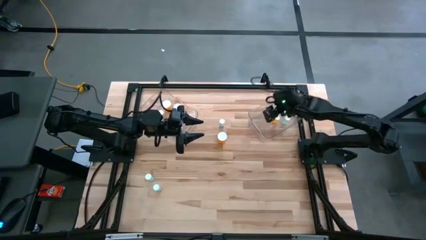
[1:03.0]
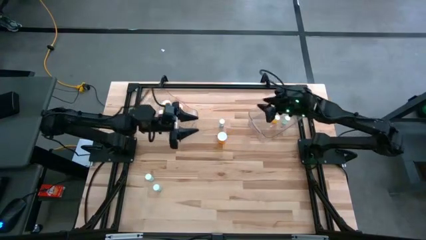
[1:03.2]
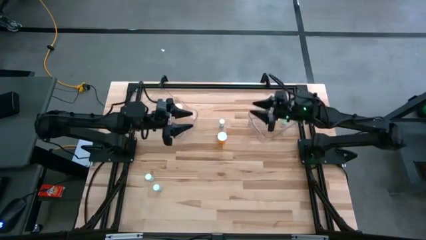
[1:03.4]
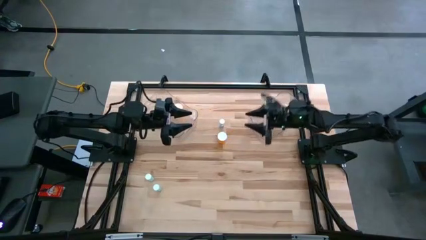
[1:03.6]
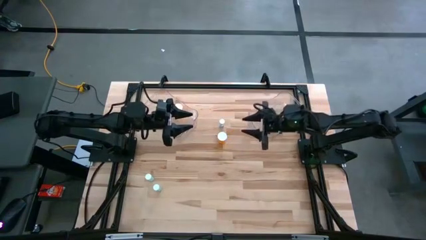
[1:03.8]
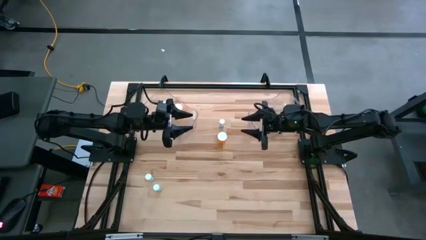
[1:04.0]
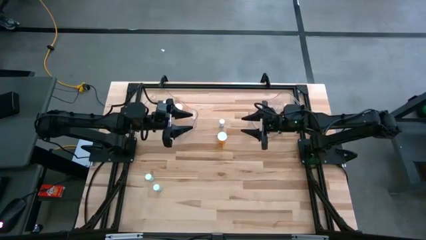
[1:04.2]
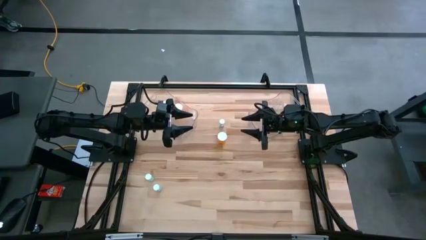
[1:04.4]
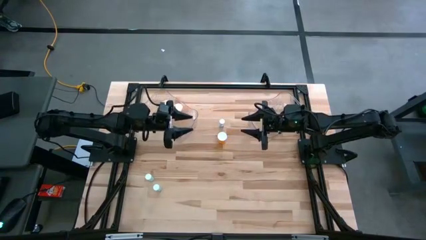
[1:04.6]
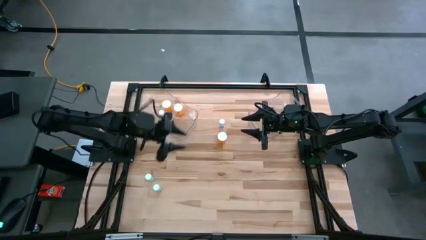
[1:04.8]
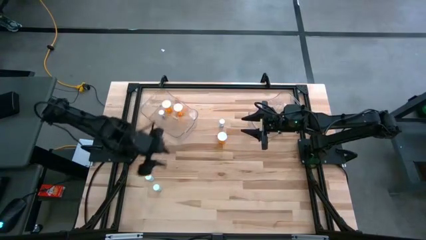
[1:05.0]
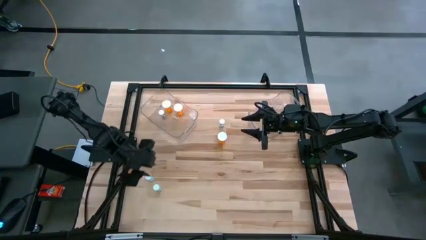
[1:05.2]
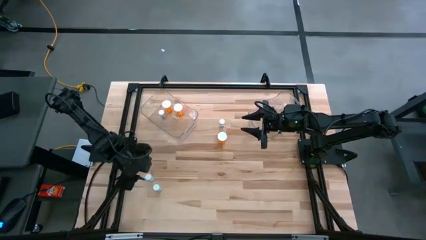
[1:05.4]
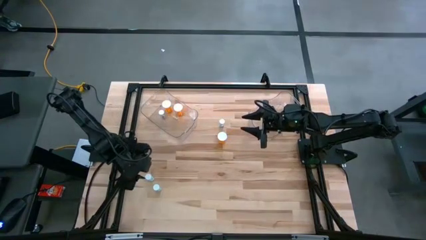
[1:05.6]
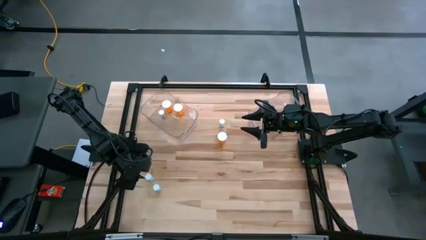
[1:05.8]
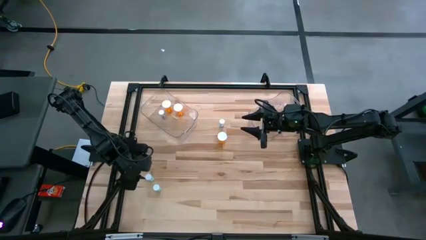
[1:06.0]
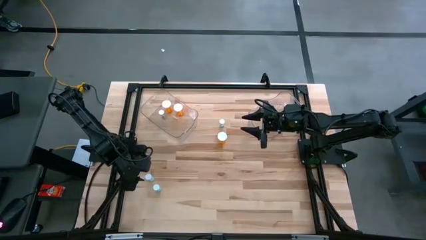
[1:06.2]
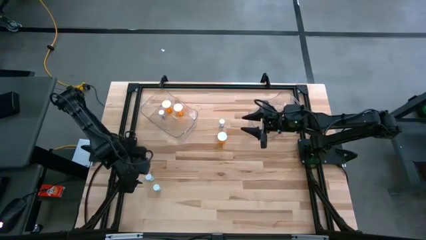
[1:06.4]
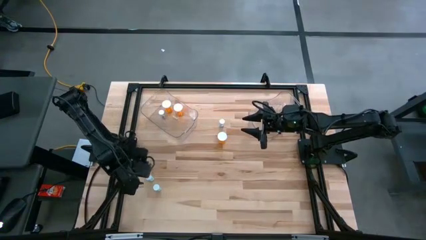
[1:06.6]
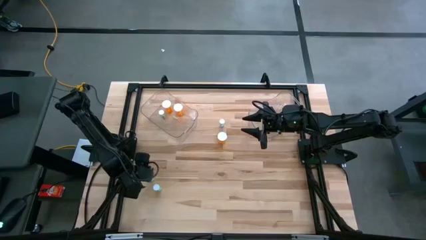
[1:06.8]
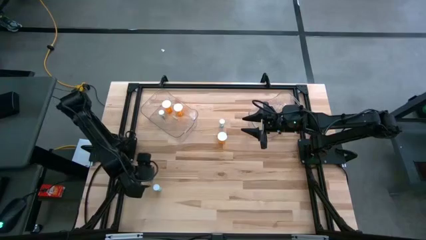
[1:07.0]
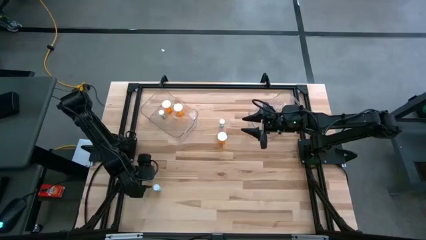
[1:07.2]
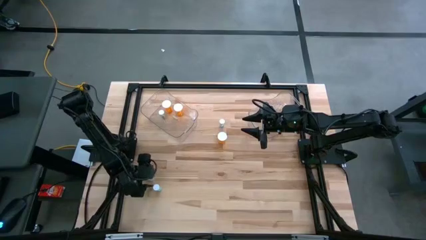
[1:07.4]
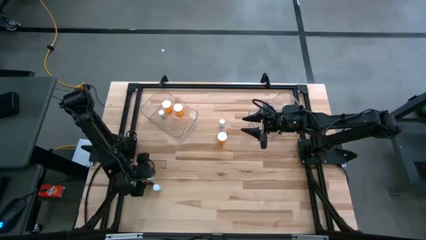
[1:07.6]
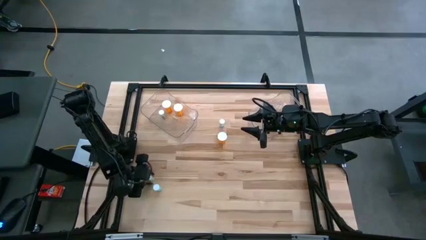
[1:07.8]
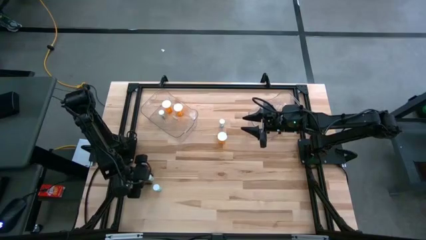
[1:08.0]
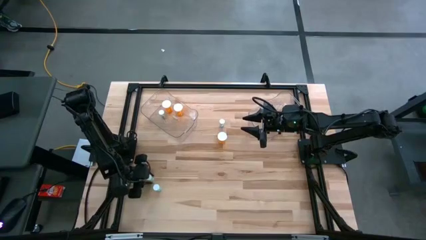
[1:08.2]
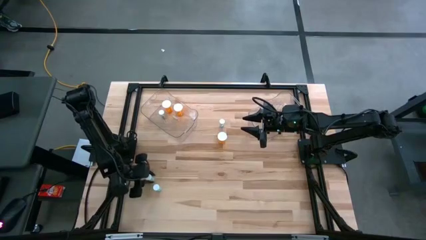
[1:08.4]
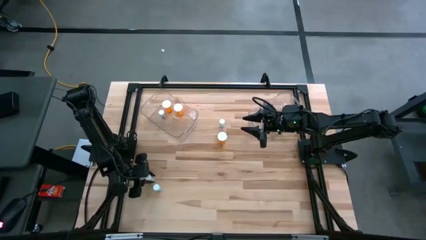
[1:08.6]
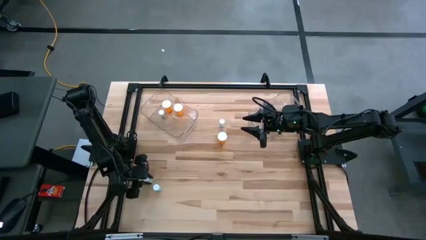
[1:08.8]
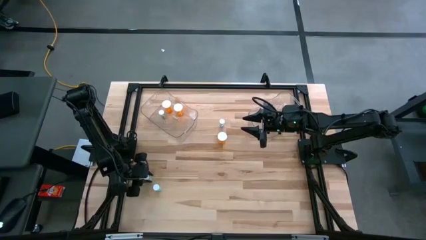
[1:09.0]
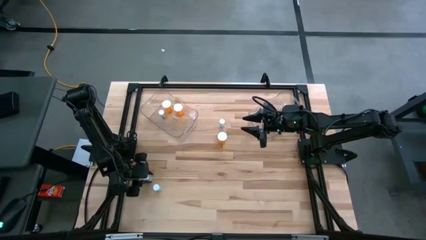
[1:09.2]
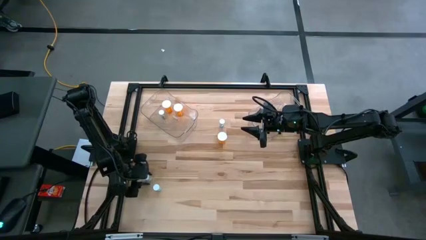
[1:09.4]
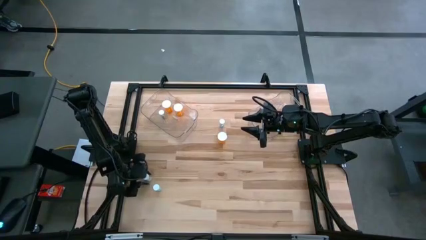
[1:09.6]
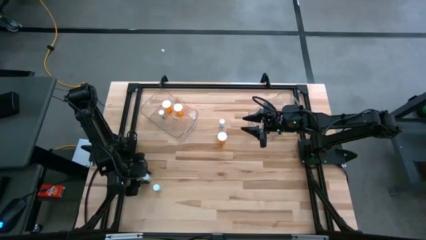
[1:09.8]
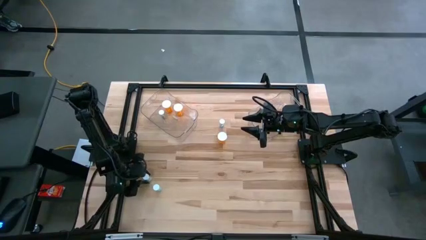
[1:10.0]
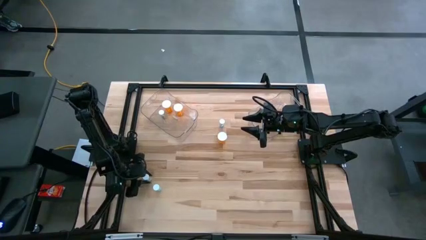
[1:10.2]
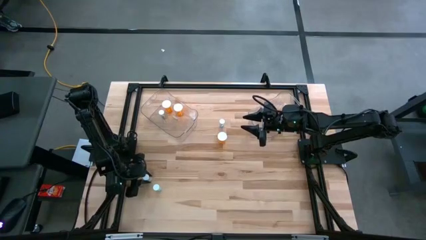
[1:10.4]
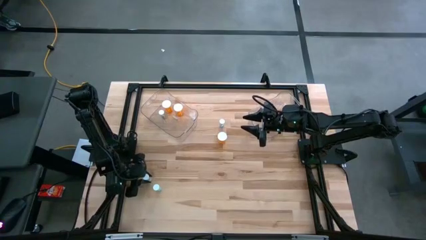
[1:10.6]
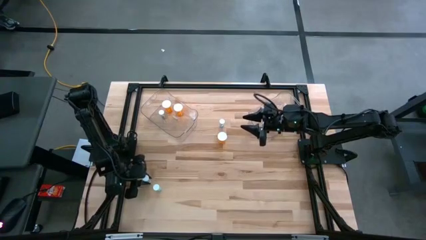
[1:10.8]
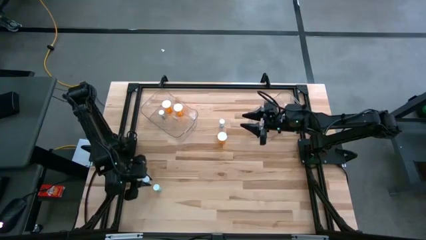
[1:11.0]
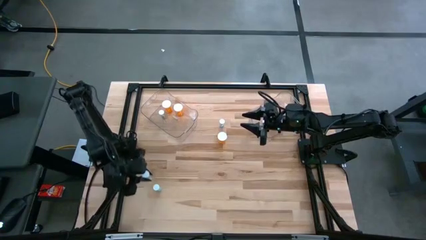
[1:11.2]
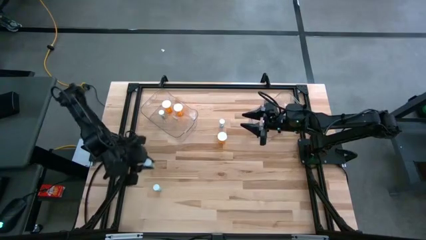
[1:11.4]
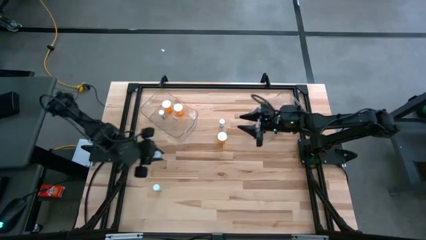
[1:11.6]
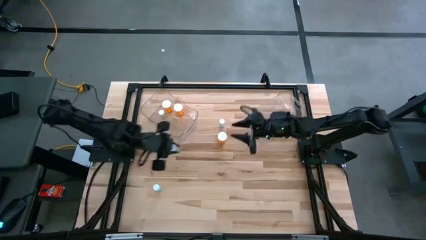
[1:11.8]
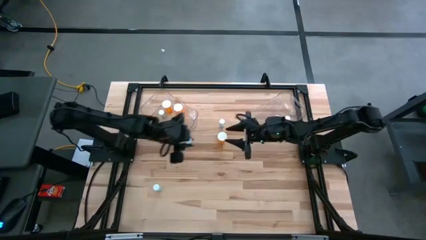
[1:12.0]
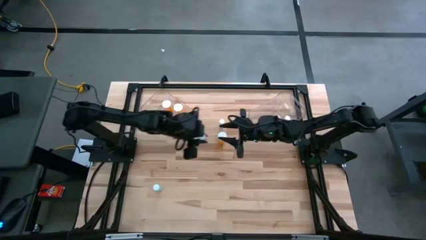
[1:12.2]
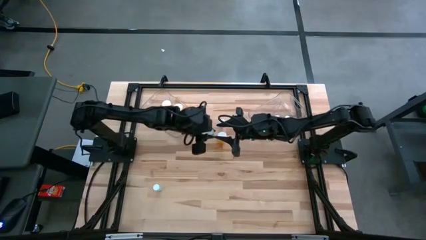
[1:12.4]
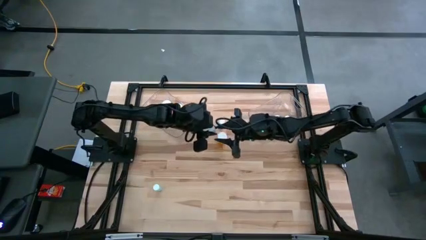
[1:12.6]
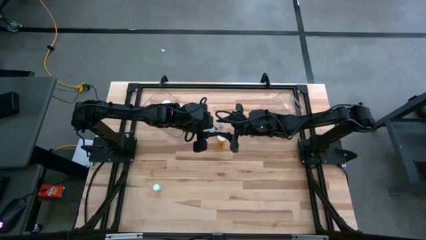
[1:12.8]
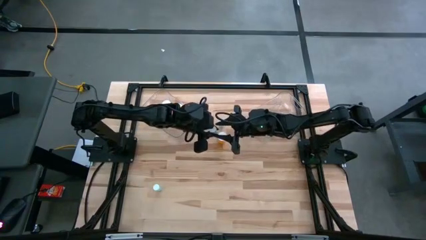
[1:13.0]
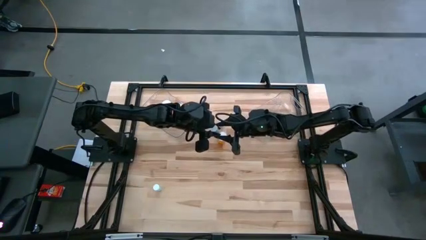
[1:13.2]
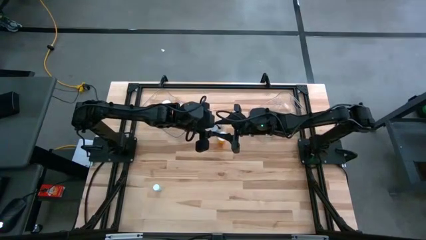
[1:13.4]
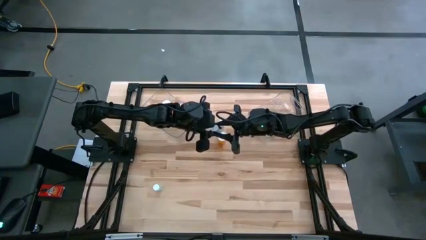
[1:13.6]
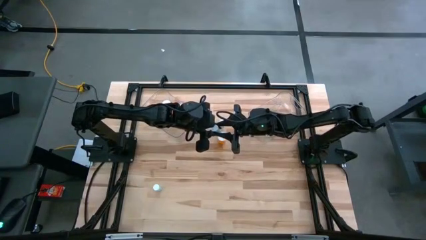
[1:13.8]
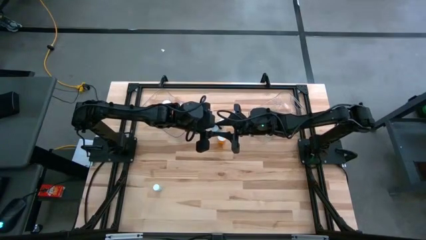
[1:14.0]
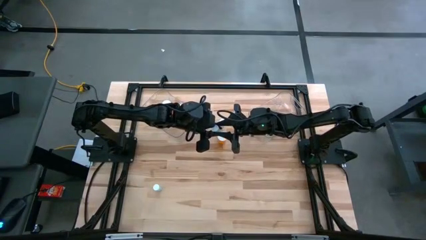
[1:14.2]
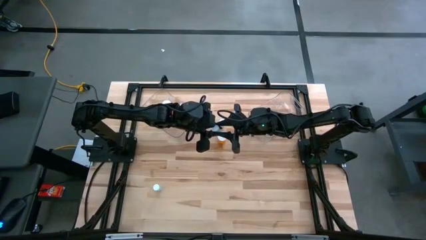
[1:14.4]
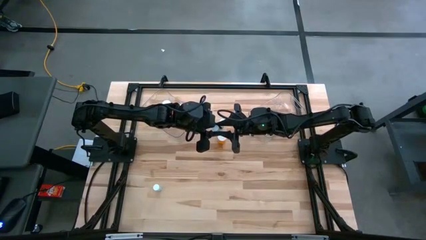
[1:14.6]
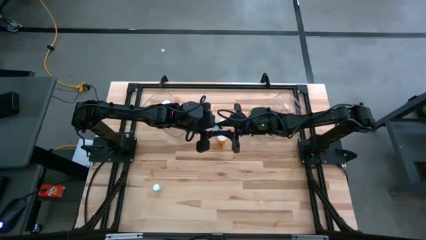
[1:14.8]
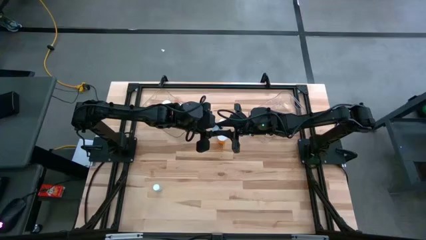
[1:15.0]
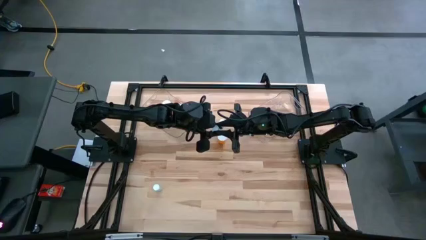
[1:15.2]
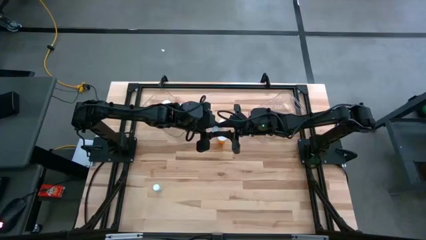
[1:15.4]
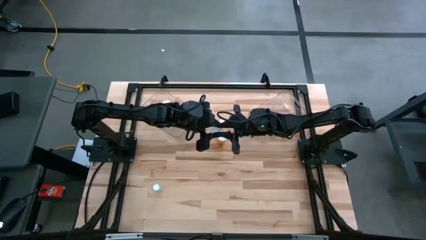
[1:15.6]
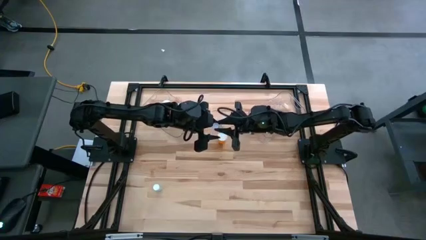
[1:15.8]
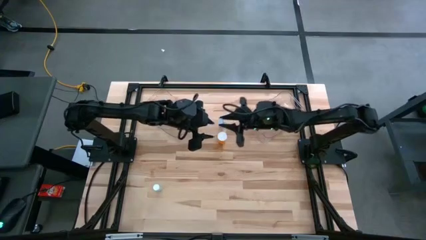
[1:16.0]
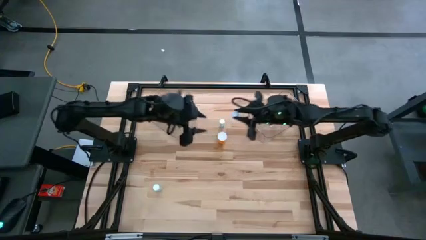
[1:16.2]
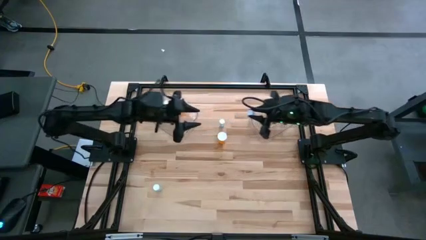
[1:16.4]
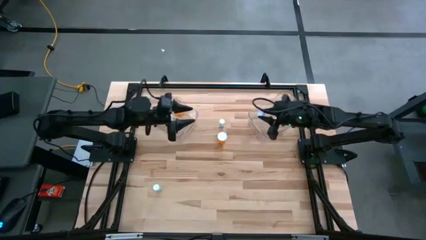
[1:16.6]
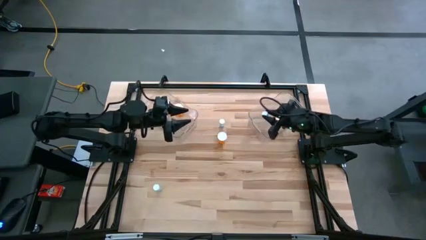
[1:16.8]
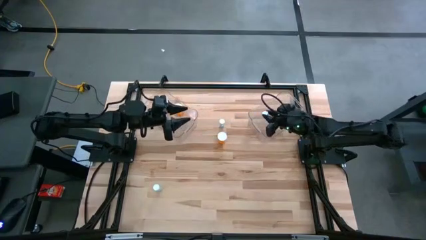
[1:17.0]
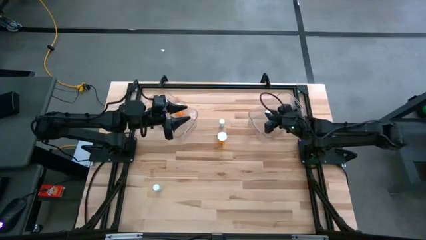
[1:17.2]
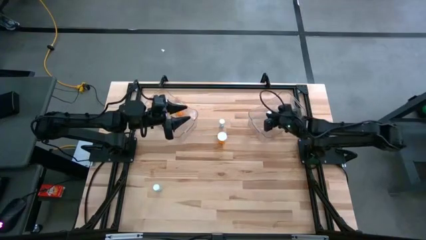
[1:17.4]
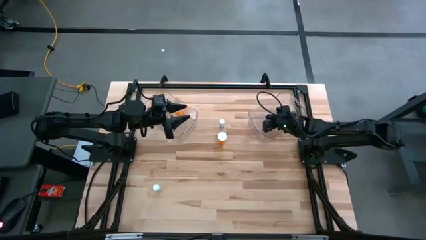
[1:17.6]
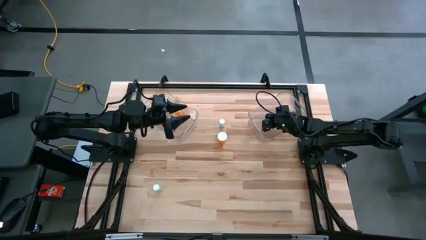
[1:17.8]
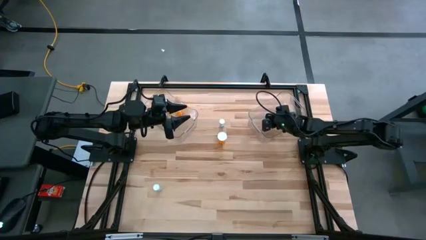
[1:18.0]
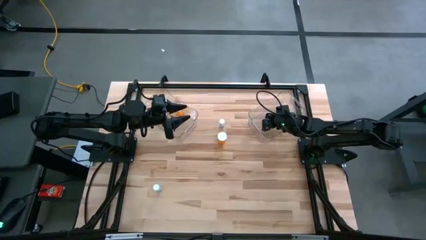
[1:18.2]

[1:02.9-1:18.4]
Task: Pick and place medicine bottles into bin by pill shape (circle, oval)
Put the top green tablet bottle into the right transparent bin

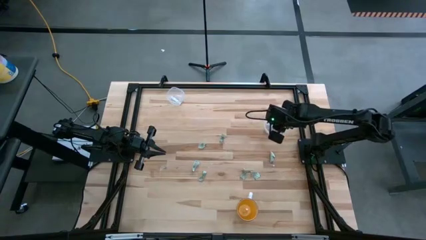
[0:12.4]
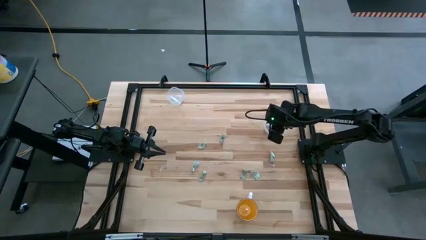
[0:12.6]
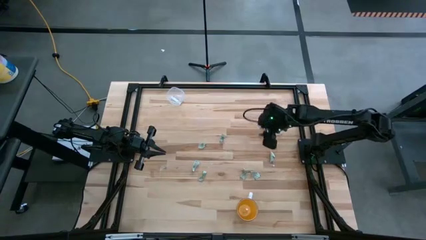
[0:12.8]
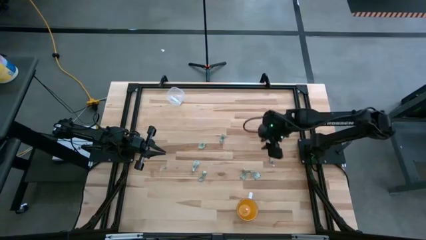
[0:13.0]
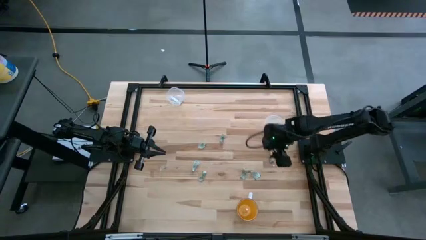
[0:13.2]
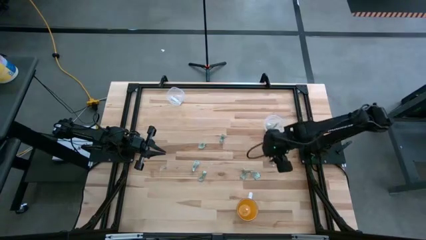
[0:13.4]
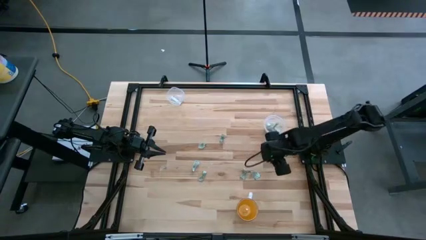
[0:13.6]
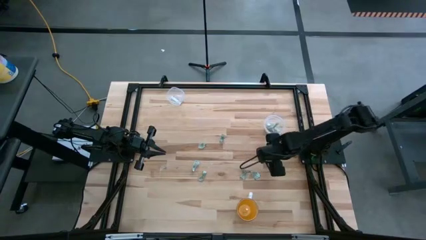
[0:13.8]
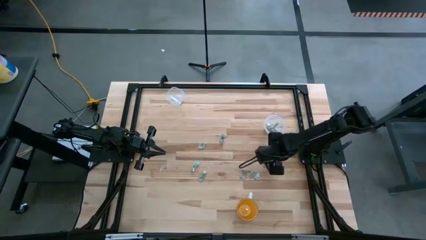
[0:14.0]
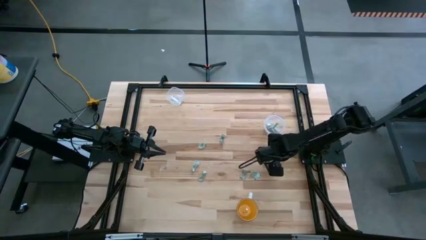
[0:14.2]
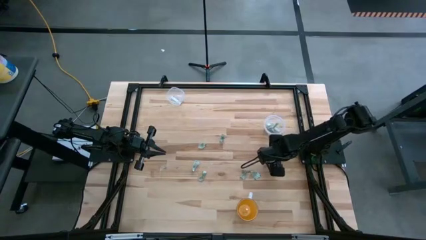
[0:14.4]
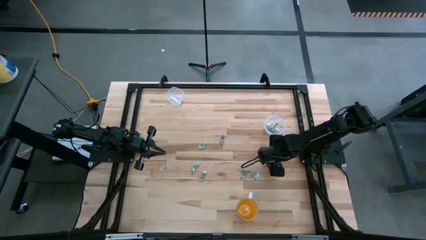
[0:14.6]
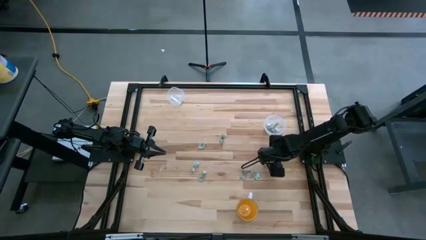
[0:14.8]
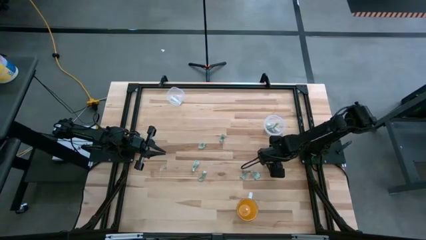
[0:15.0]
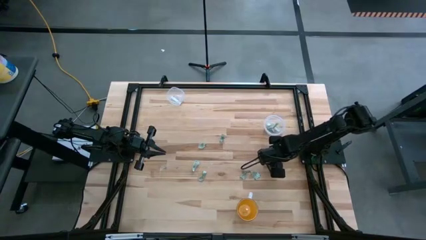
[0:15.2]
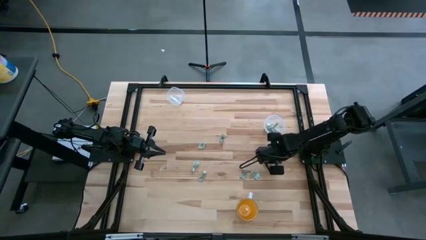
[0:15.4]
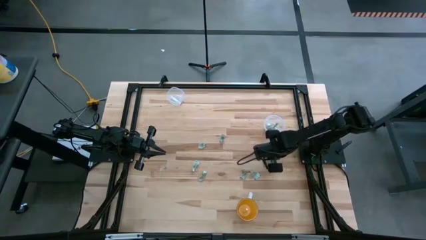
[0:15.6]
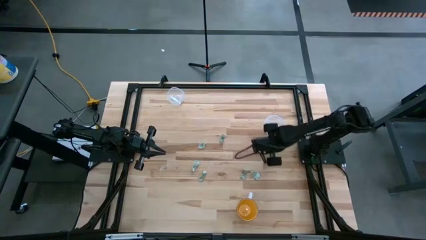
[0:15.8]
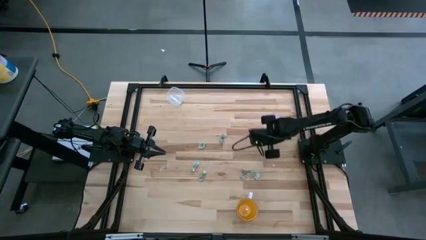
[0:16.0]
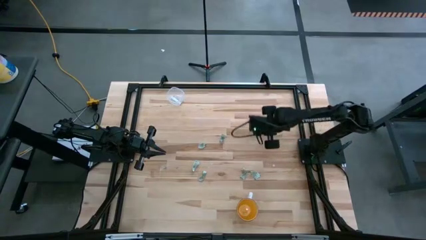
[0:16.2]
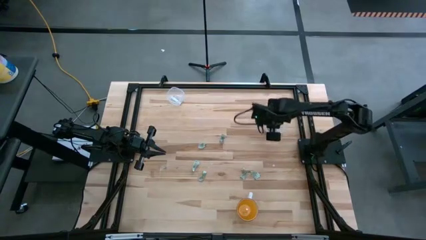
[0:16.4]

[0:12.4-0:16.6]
Task: Pick and place items into bin
Put the stevia packet into the bottom transparent bin
